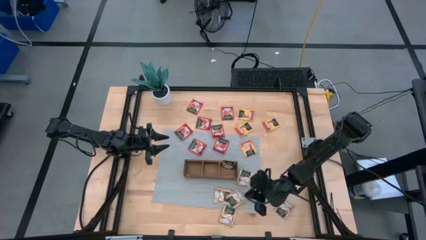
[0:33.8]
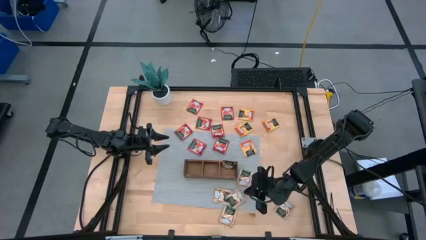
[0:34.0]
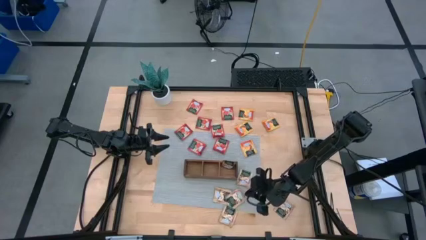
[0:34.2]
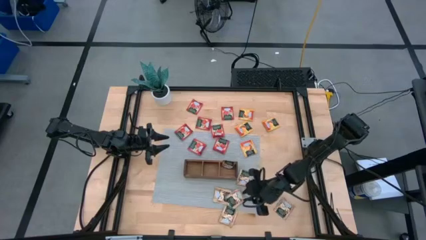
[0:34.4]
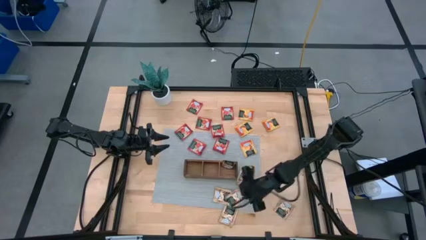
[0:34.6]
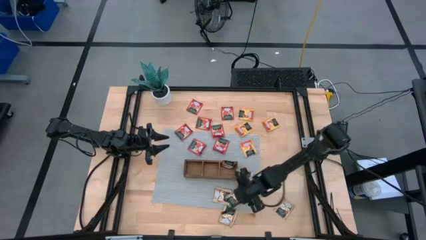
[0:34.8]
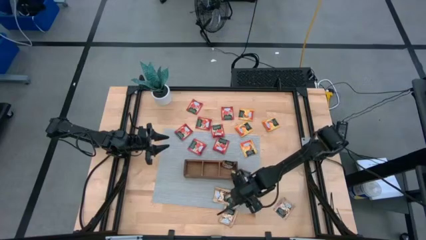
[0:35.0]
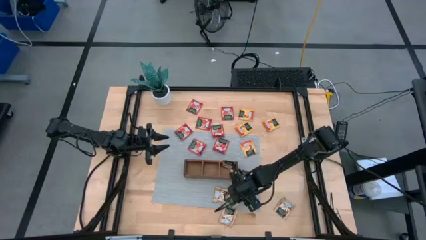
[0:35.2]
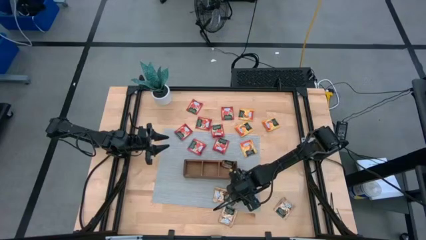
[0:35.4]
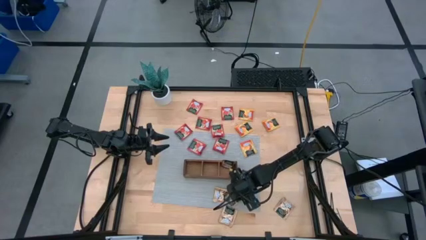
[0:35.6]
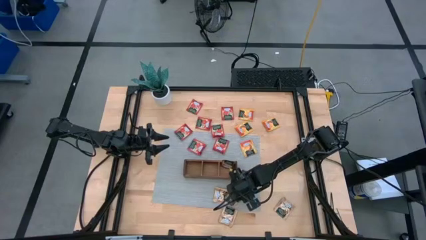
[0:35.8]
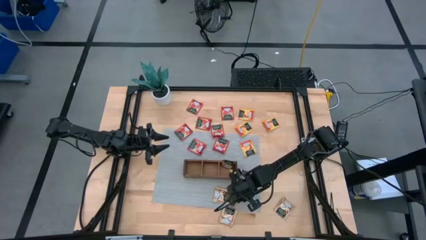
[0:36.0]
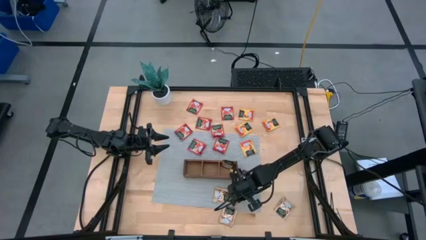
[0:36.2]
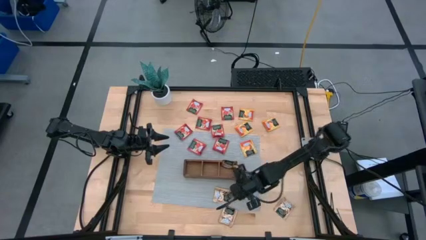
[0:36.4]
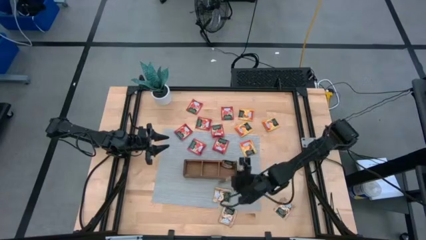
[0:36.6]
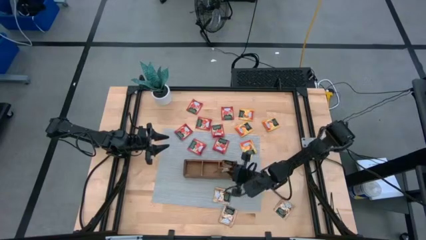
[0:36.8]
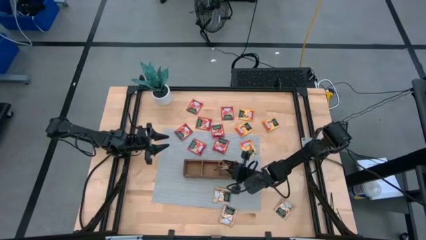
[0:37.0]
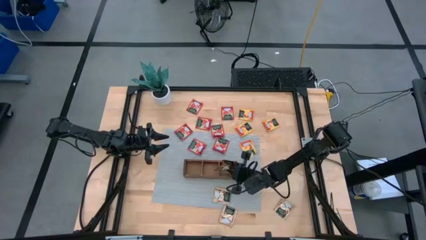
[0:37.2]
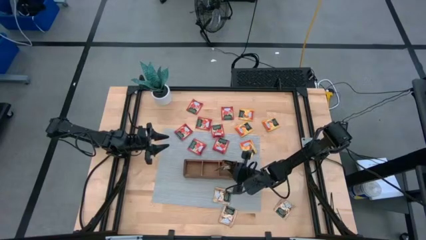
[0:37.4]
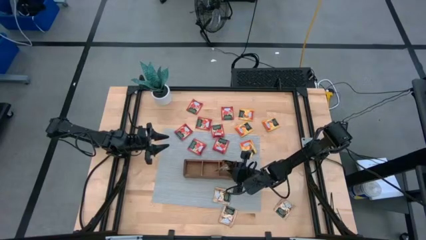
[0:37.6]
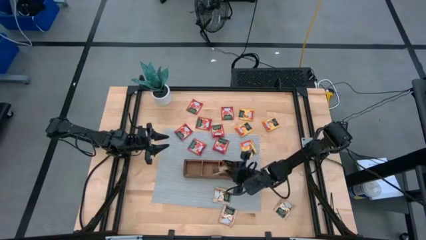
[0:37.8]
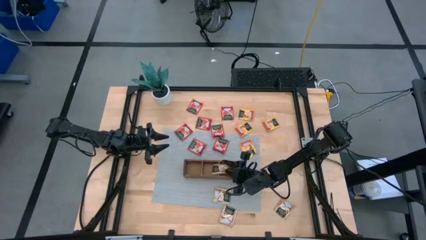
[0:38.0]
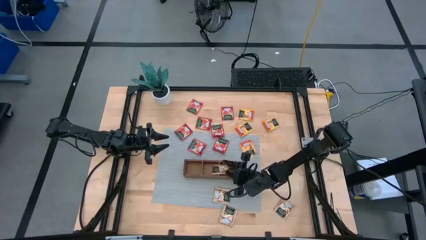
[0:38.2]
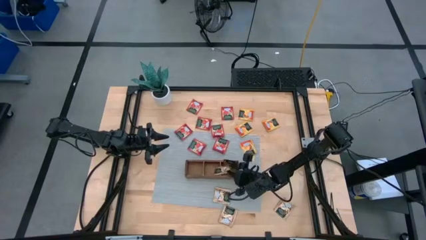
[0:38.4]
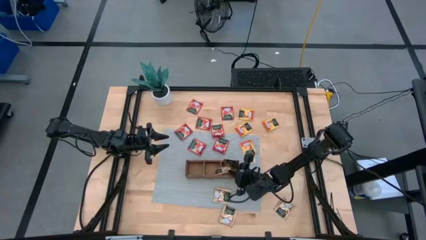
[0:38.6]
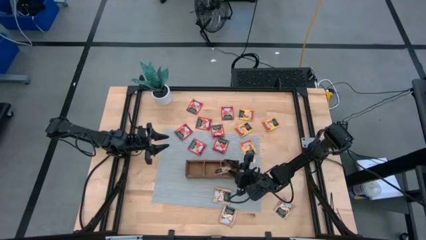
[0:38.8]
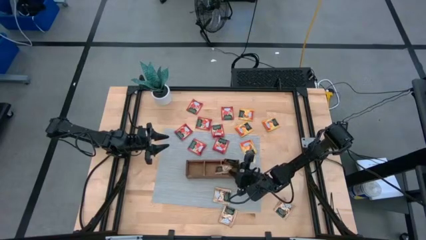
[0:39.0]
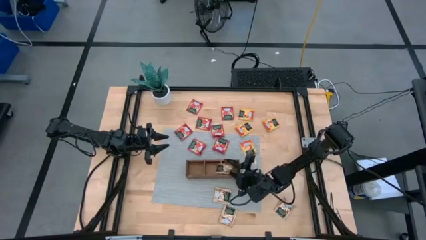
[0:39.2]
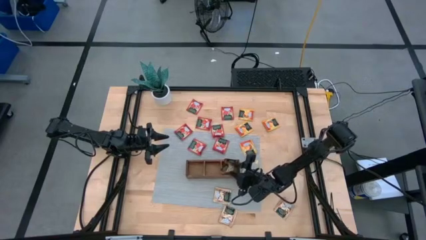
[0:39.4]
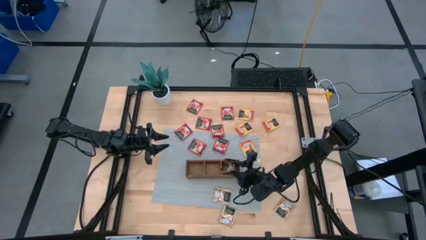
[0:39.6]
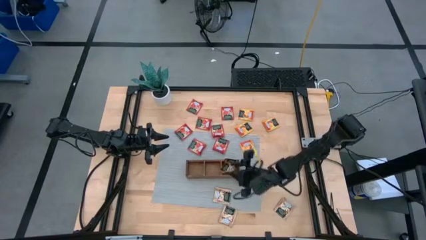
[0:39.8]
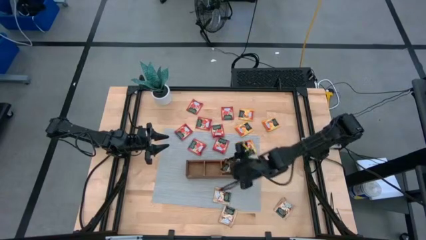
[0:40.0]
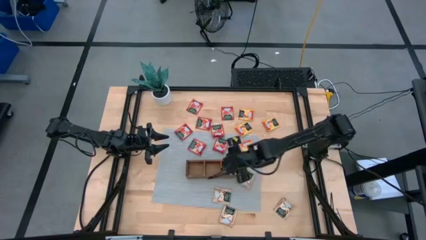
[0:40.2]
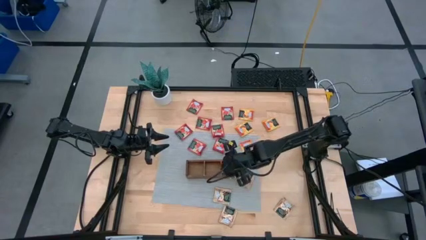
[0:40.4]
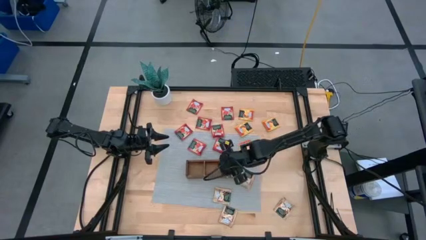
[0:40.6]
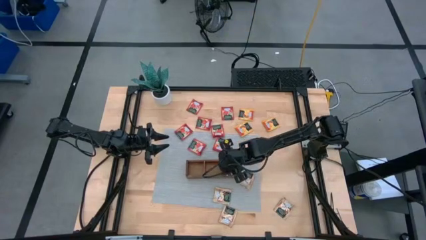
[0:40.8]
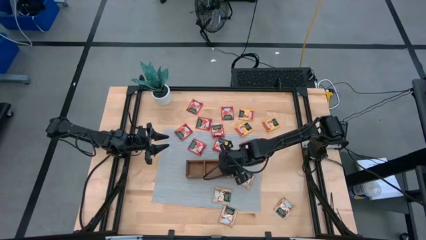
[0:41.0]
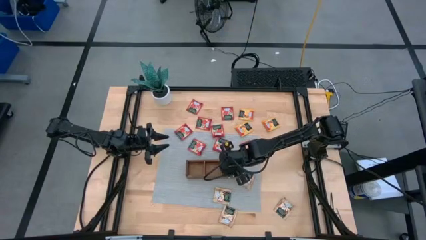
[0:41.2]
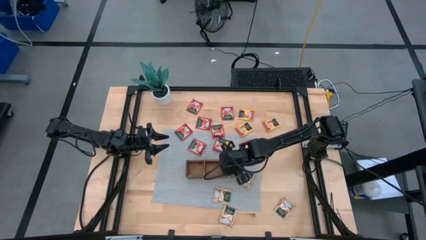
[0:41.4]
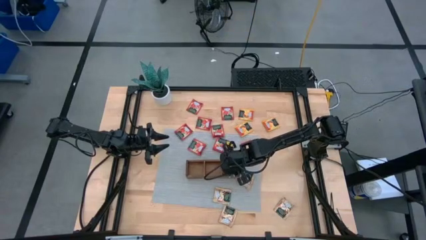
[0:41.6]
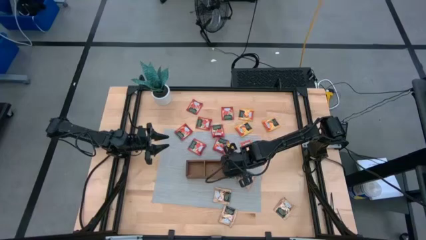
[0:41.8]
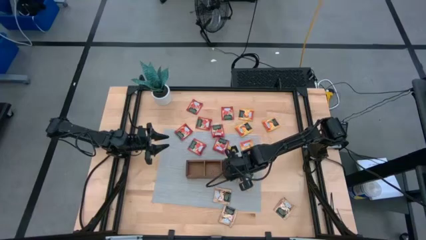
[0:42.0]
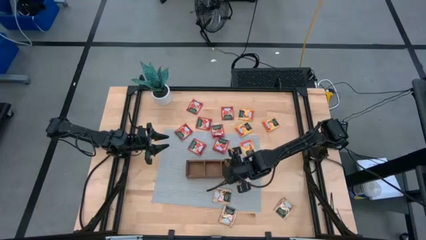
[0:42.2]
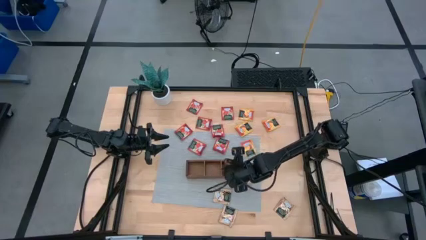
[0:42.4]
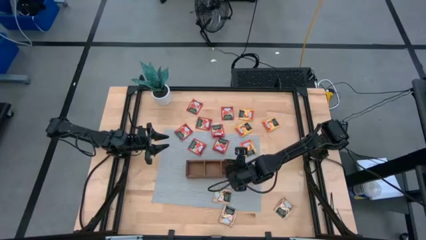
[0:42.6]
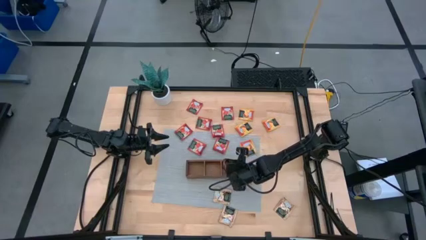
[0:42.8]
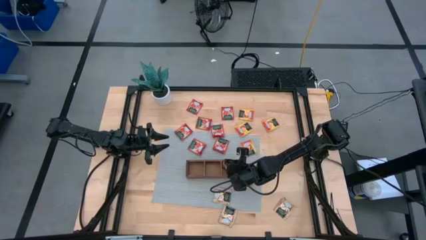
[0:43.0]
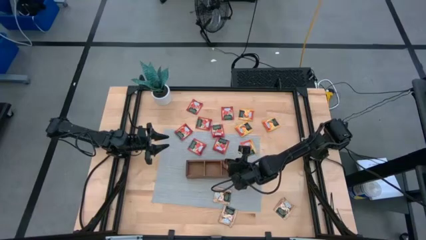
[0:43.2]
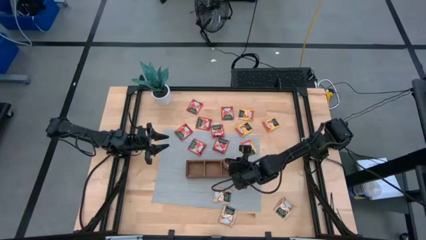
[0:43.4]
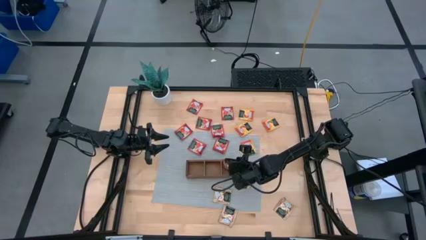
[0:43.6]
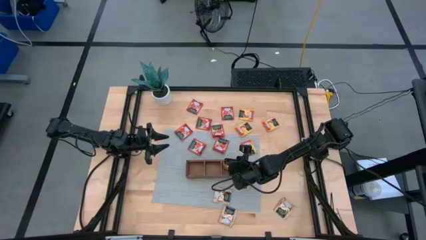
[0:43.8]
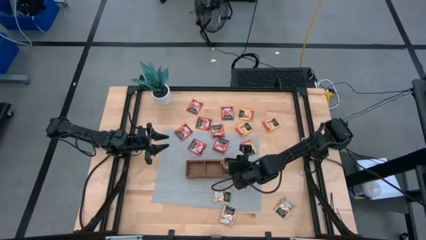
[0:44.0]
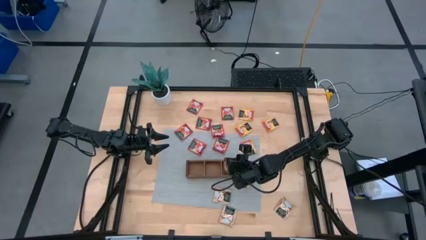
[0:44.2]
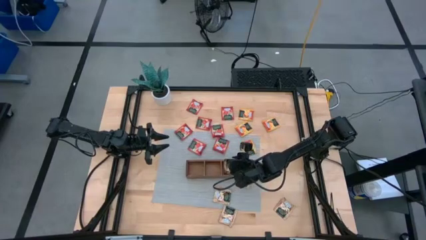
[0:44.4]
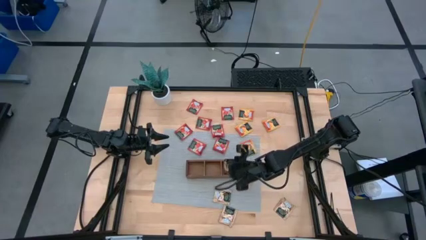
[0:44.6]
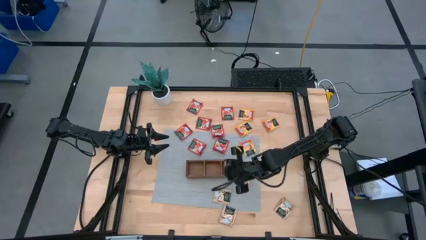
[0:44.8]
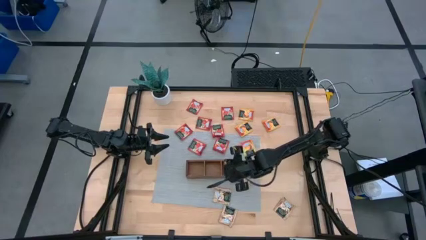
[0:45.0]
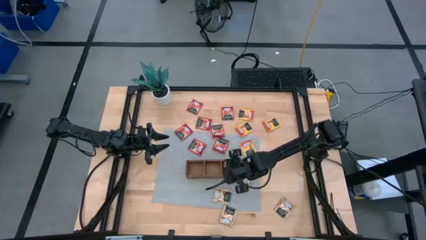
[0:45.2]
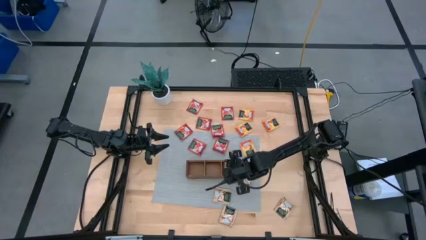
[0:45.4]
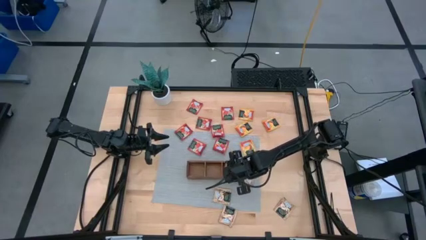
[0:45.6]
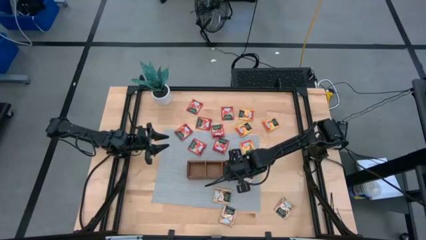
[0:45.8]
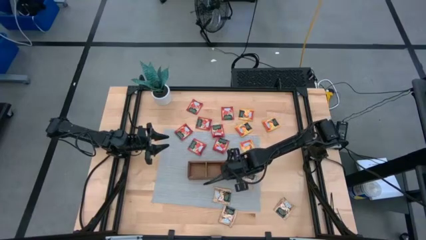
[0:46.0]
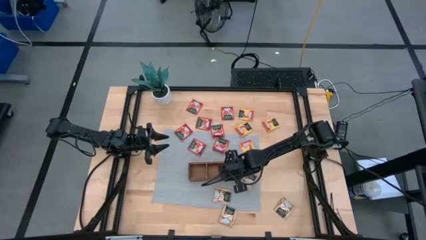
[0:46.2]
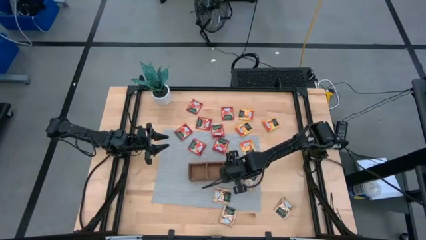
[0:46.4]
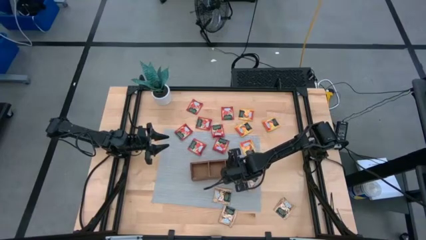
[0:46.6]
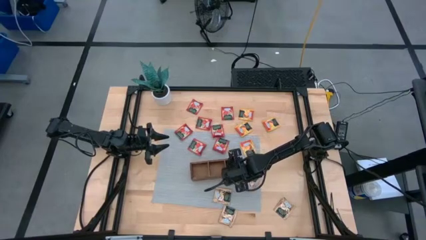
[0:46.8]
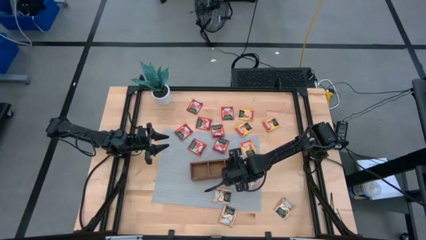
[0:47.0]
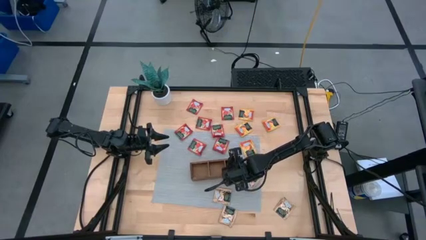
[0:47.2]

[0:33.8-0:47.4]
Task: Pick & Place Tea
Put the brown tea bag into the right compartment of the wood organizer

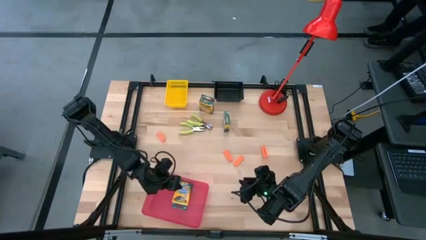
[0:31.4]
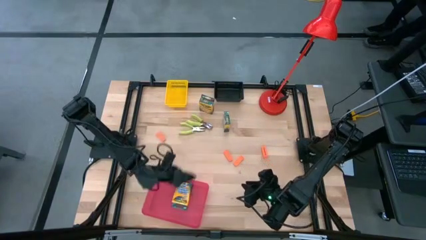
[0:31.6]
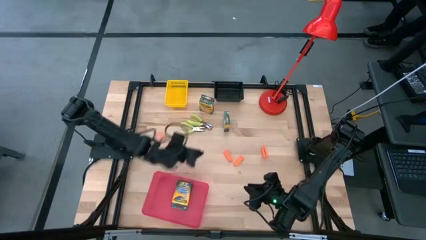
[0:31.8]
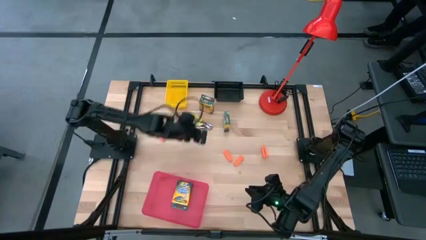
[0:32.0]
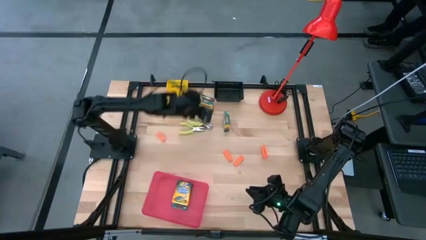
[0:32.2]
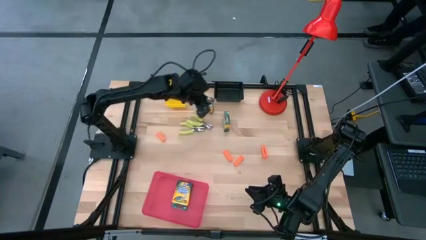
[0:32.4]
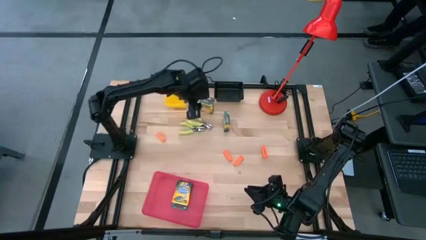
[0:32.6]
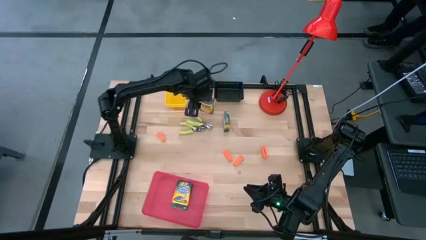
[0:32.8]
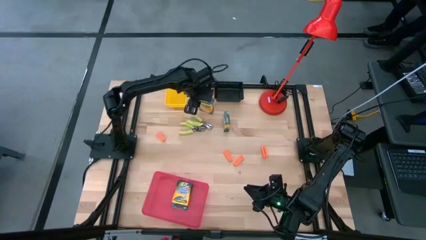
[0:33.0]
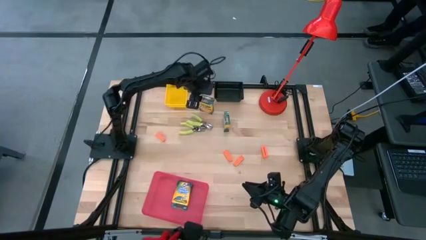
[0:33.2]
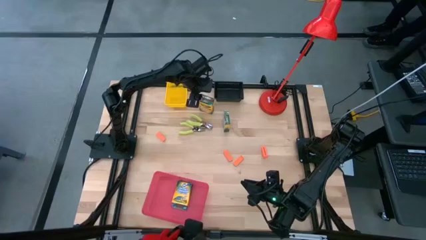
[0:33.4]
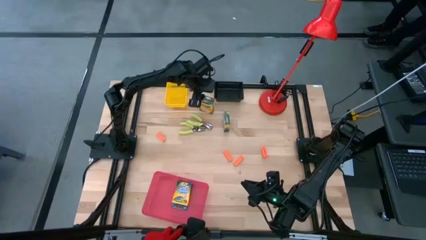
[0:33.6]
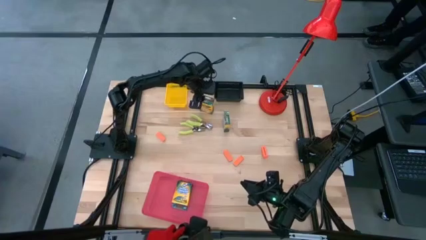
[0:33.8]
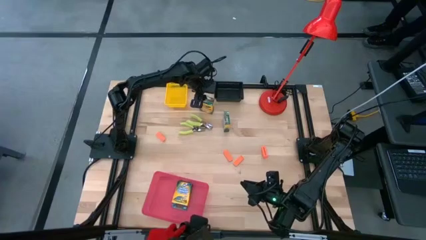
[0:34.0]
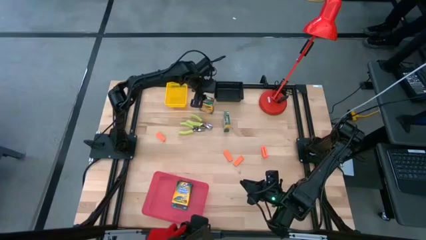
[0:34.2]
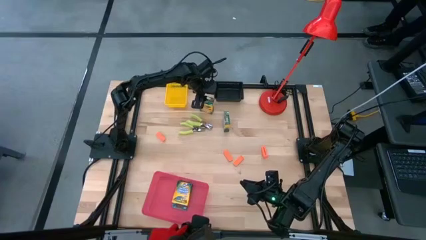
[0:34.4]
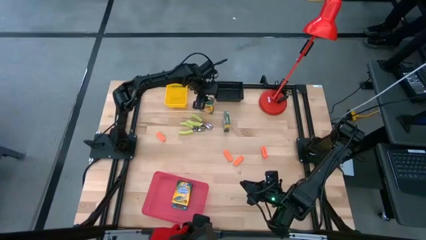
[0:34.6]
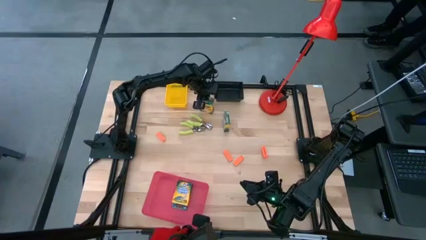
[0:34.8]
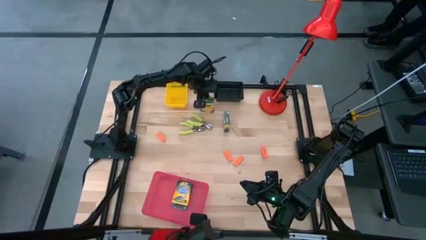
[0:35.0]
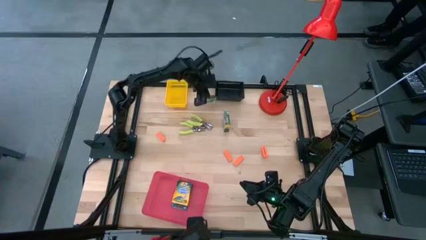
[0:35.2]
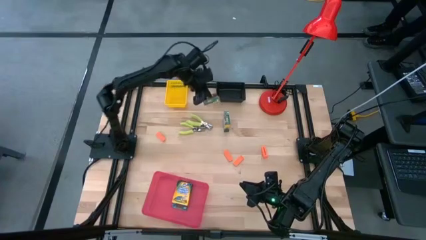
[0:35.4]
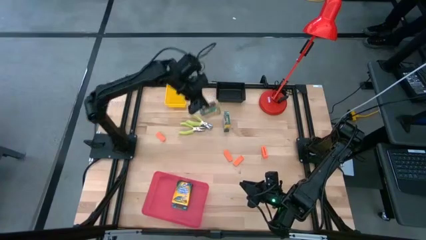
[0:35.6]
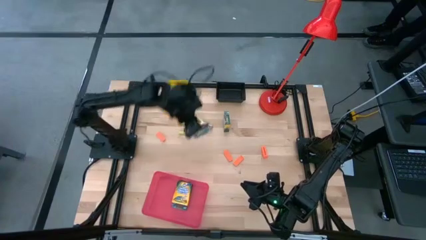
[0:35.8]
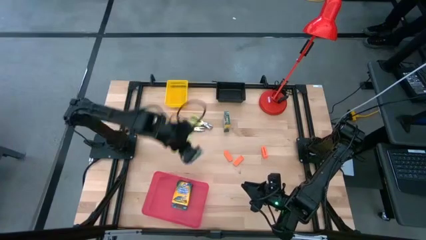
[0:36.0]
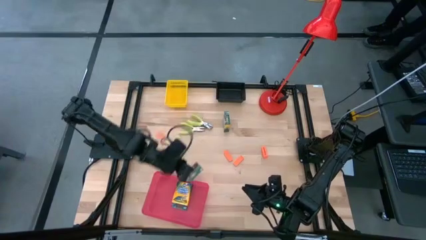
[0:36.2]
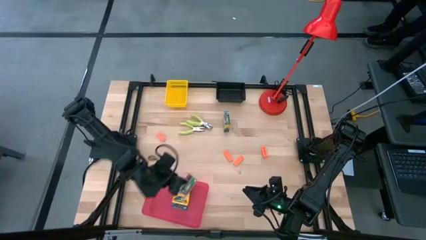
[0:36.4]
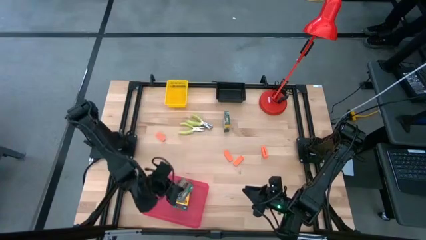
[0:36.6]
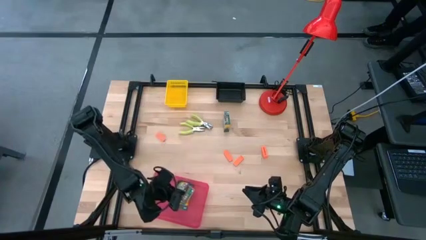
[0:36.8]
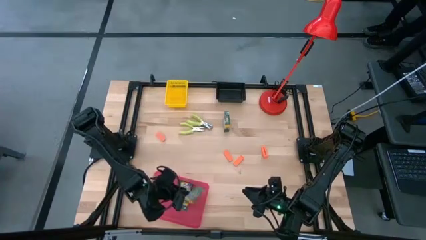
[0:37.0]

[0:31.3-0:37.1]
Task: Pick & Place School Supplies
Put the yellow crayon box into the red bin
